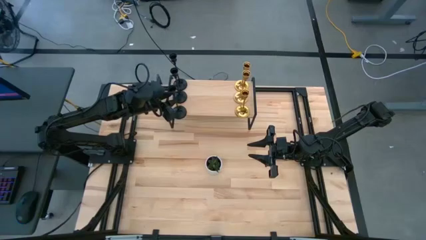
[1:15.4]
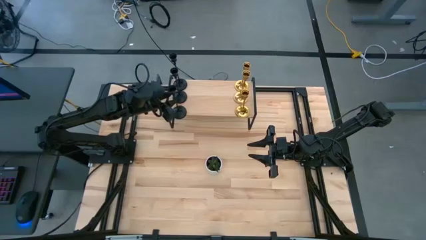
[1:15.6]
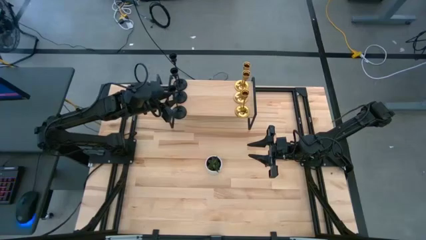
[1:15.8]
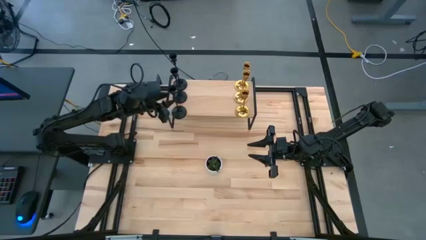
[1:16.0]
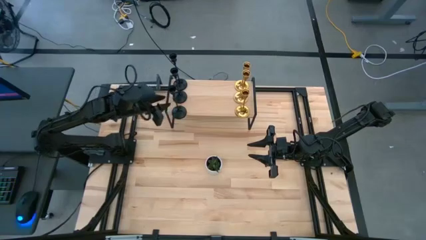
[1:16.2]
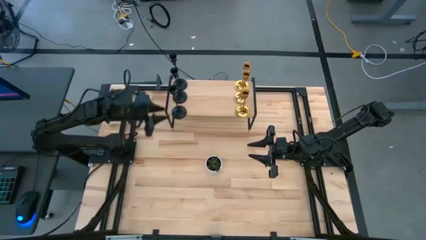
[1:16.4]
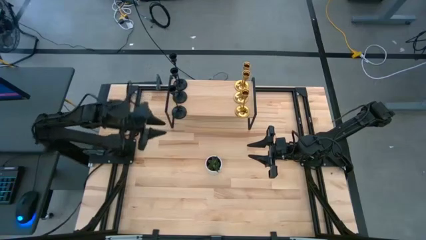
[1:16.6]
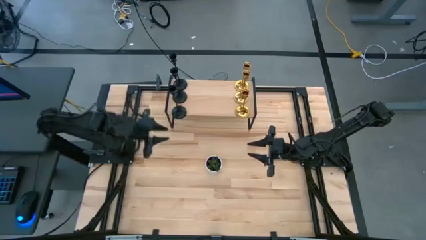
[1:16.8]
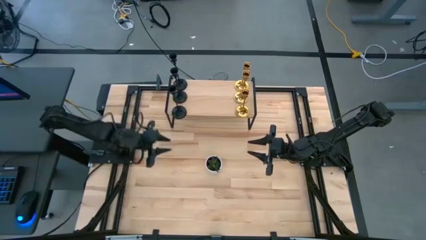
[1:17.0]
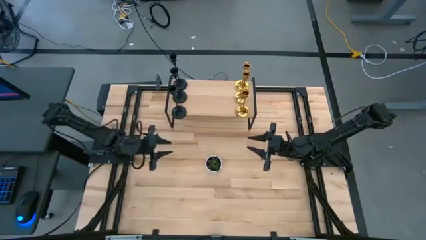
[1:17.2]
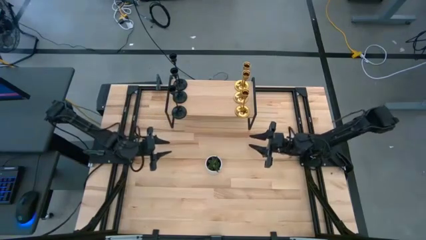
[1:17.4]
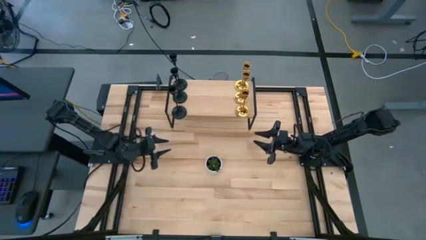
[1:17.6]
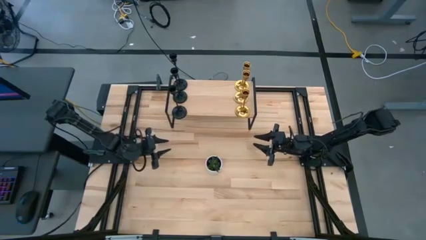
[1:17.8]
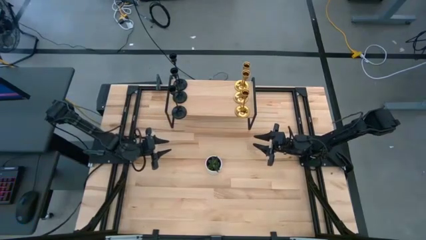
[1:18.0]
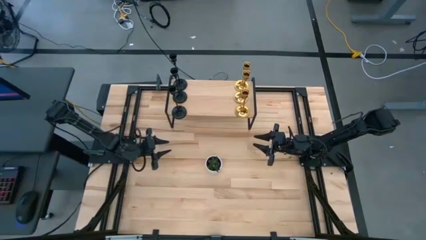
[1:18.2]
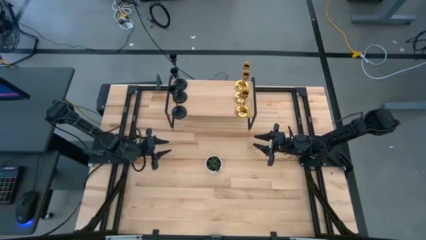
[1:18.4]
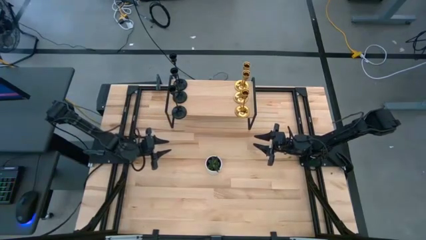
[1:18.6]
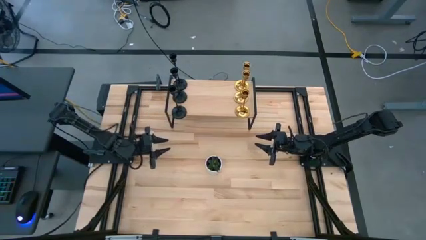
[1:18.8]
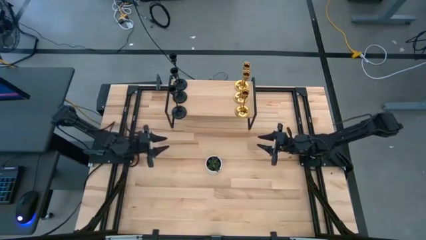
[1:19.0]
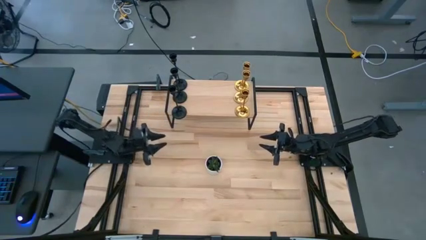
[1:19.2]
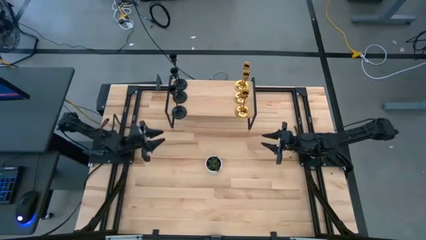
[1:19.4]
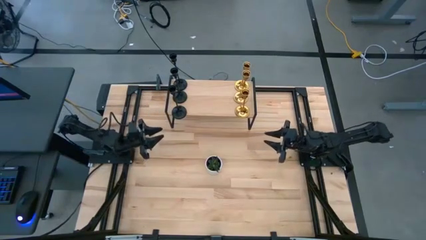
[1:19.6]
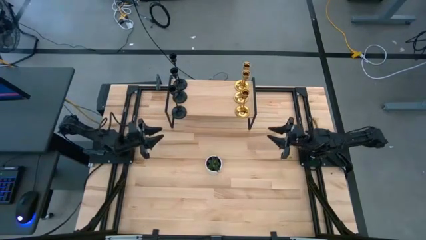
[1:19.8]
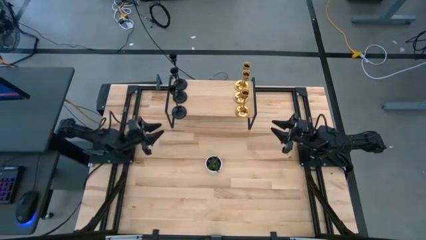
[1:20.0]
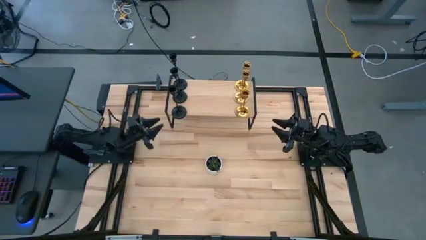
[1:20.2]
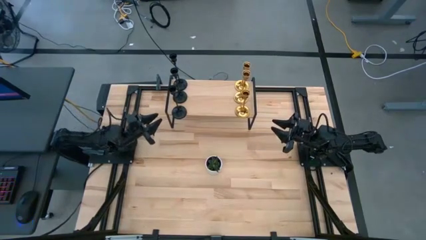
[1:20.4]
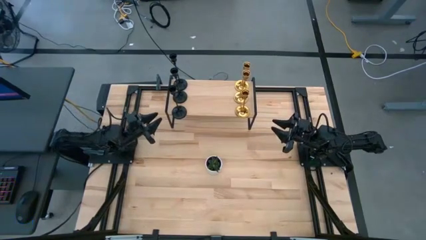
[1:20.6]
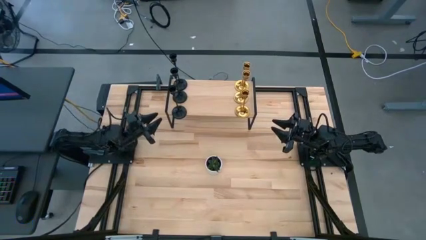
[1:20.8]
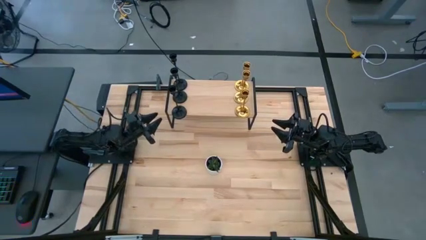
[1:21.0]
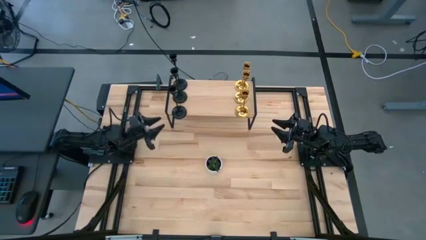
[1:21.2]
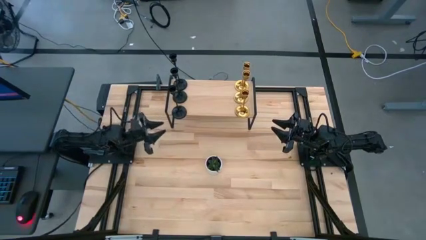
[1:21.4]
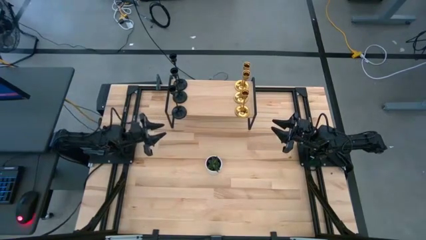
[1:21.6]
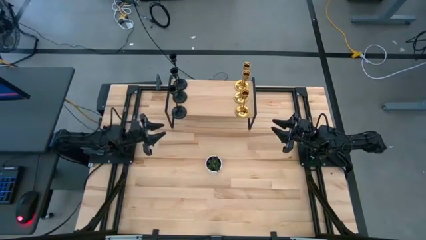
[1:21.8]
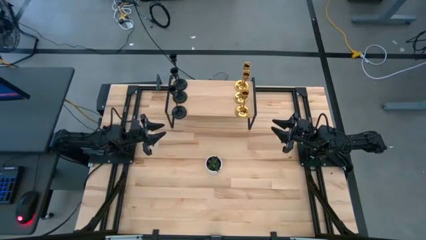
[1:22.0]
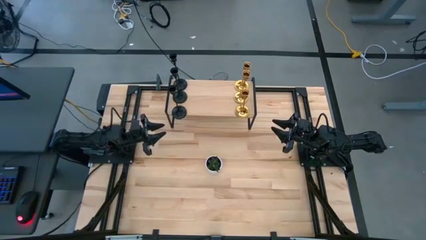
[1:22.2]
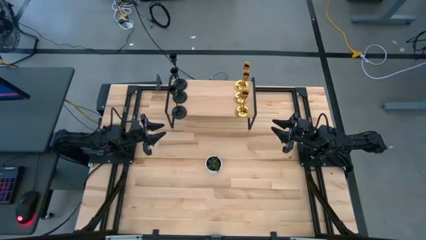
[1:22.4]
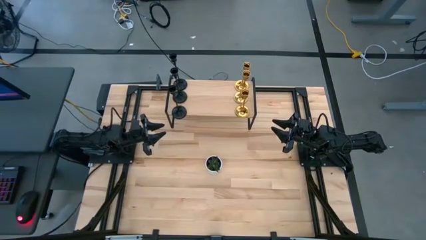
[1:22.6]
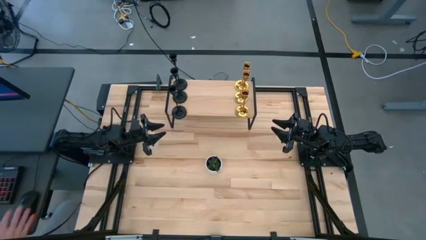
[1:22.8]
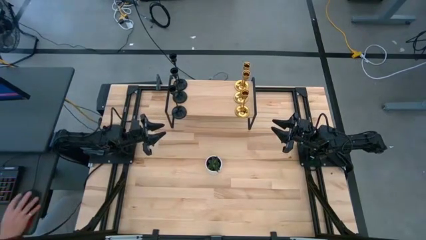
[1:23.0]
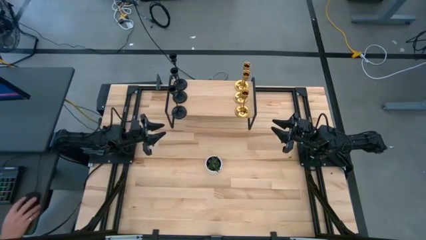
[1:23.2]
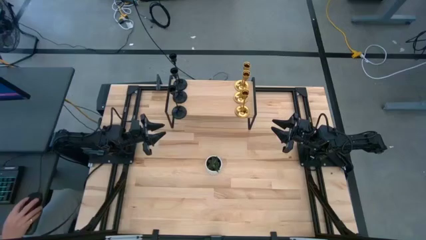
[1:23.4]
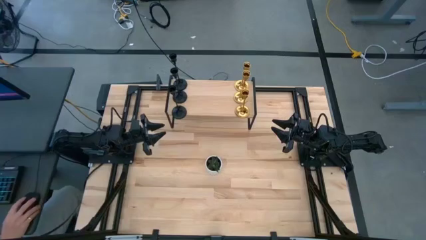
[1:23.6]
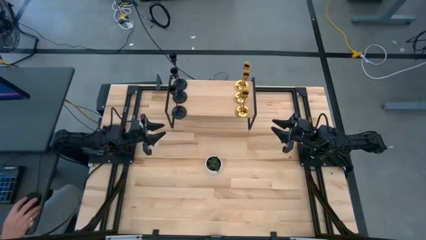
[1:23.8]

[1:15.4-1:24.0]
Task: Pick & Place candle stick holders
Return to Home Position
